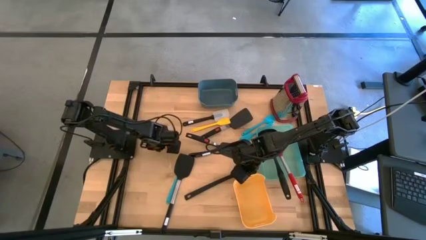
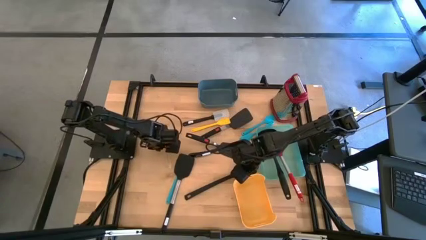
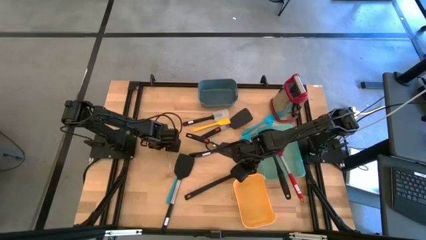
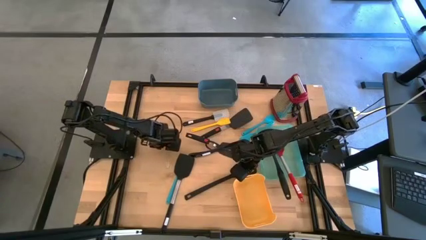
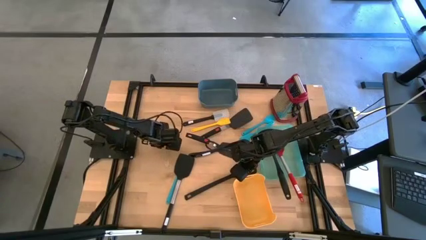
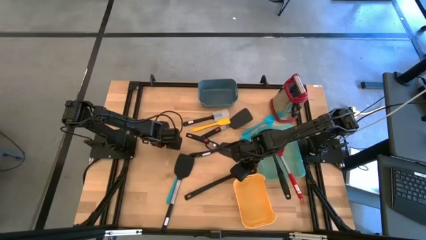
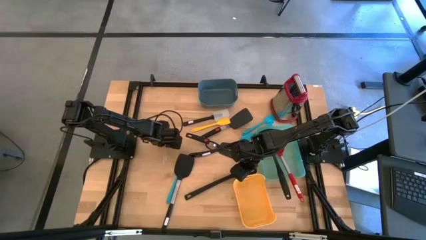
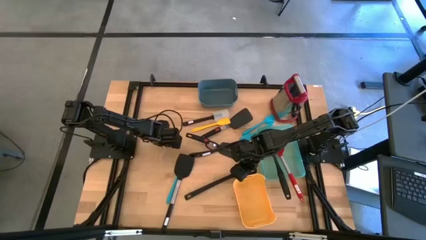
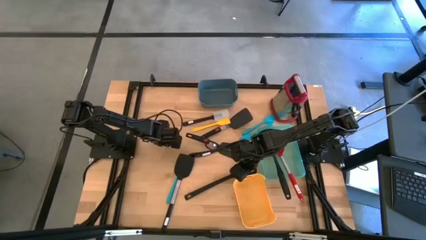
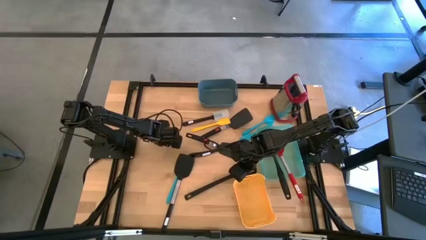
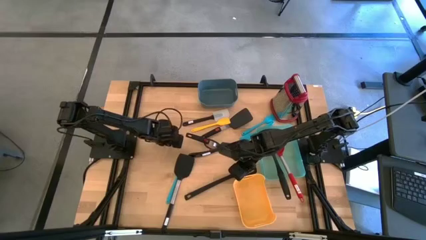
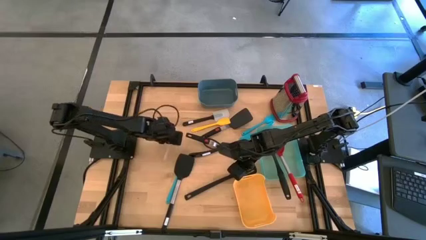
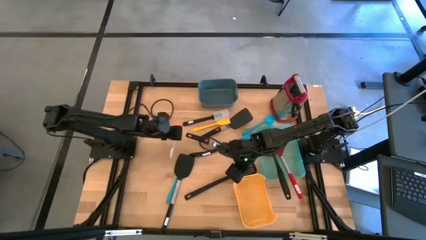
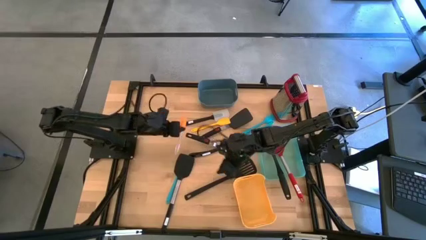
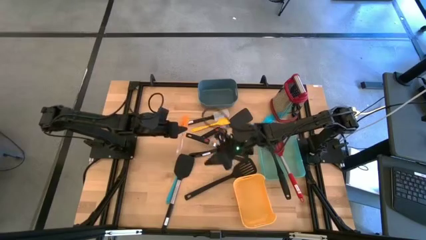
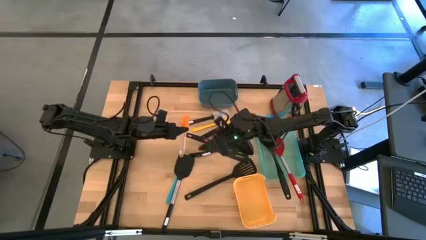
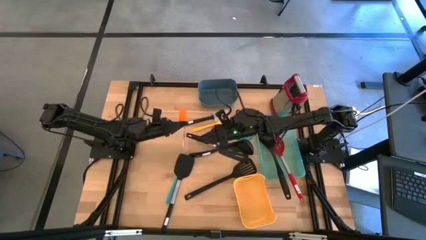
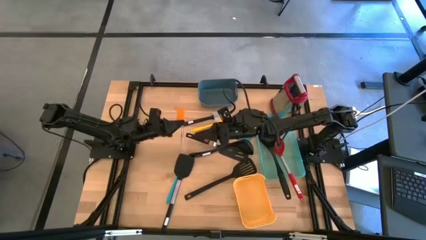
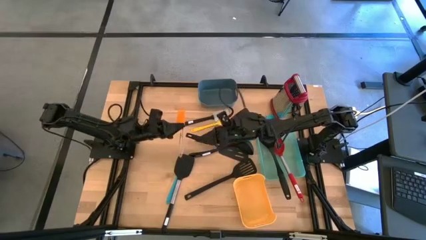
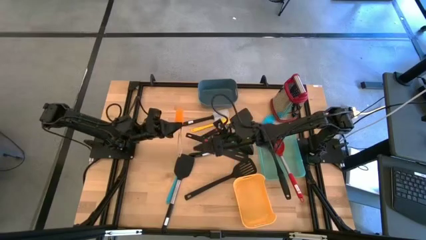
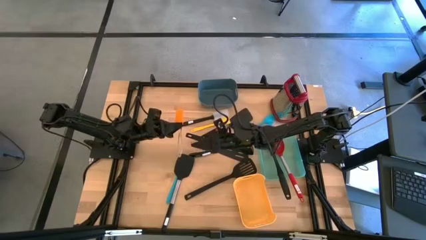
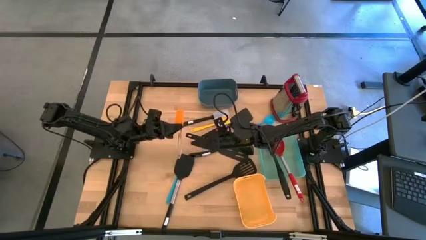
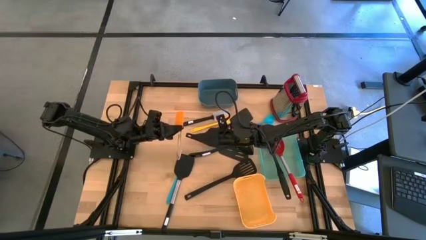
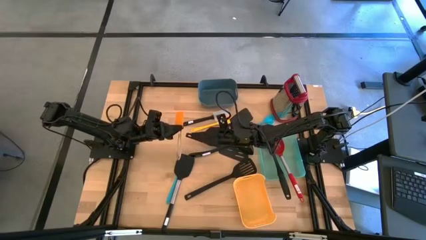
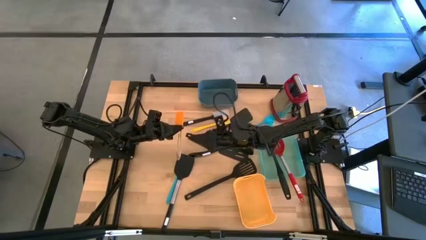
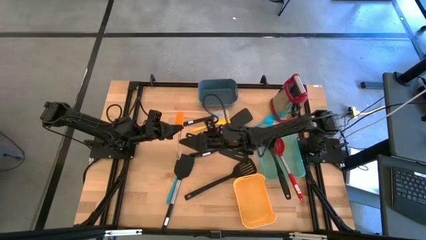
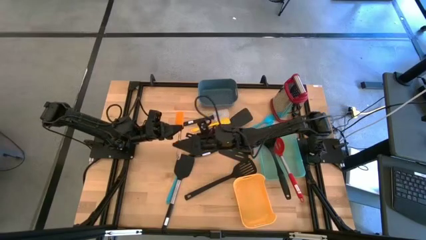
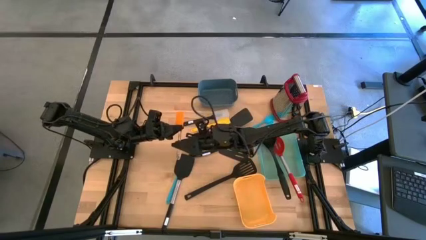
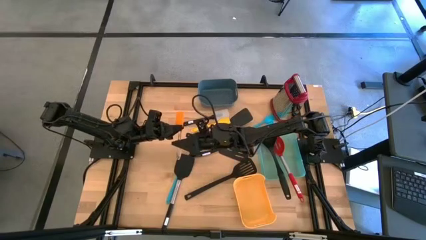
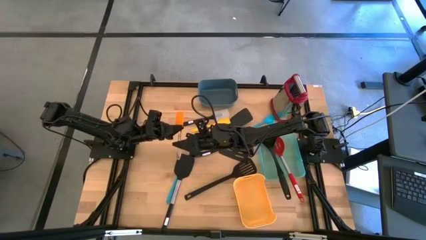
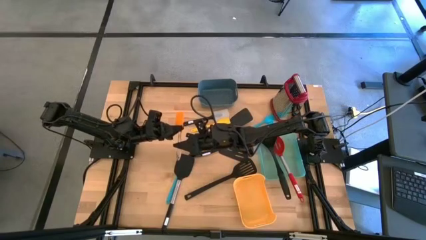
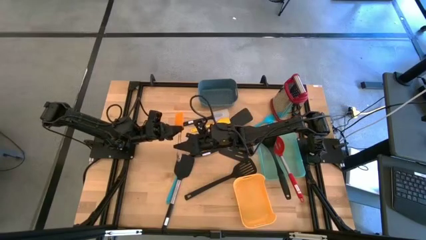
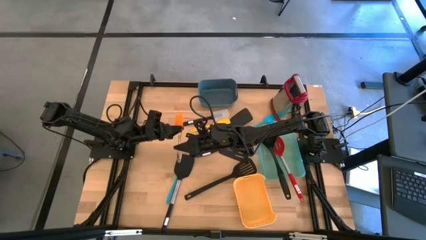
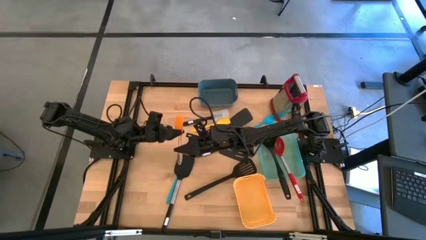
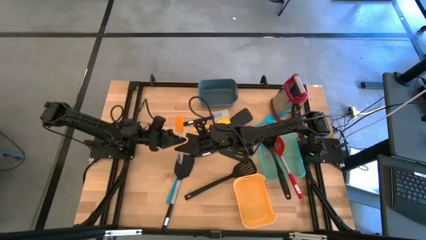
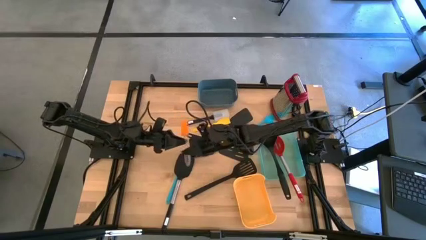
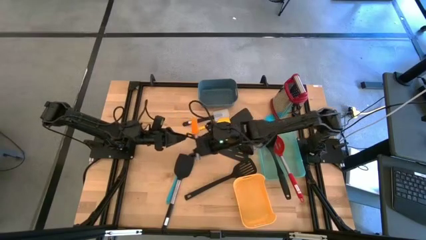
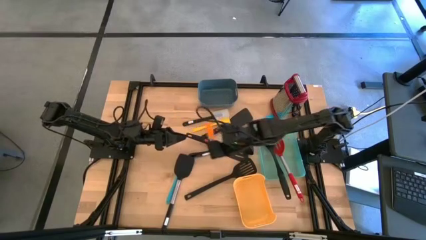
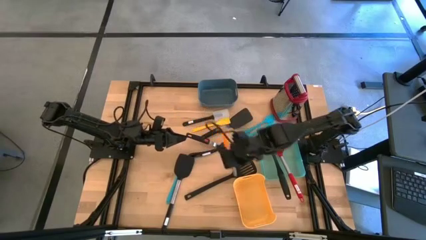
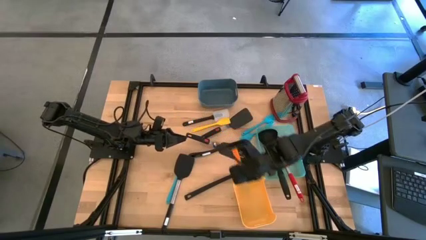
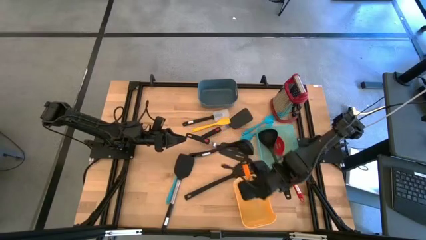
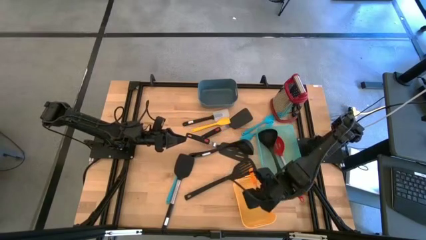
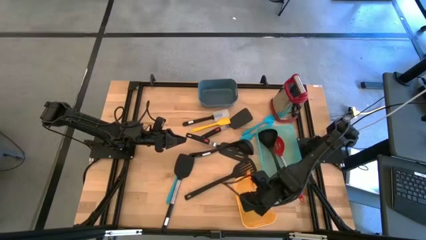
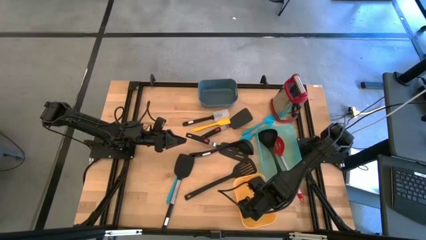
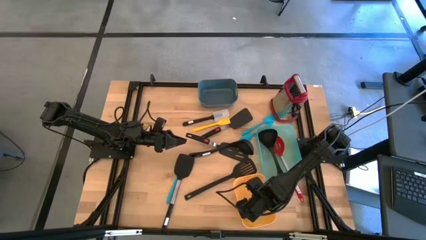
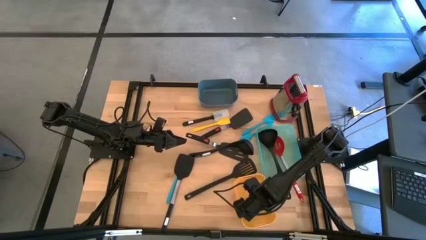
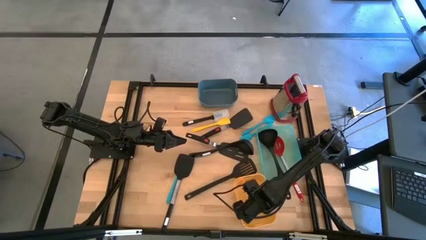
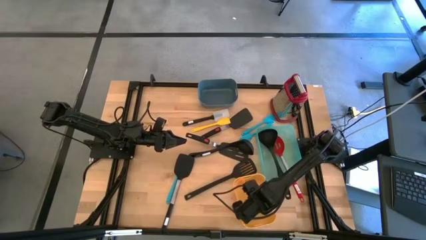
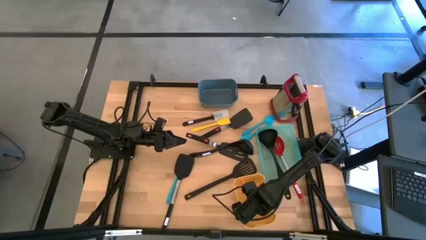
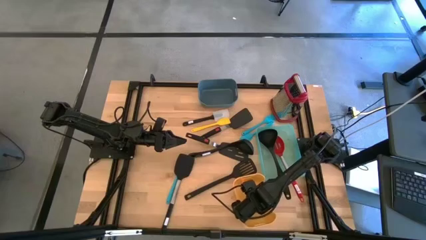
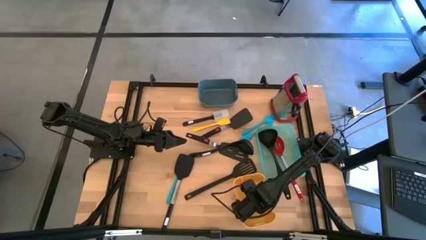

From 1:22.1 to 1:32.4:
Task: Pick & Place Kitchen Items
Put the small orange spatula into the yellow bin

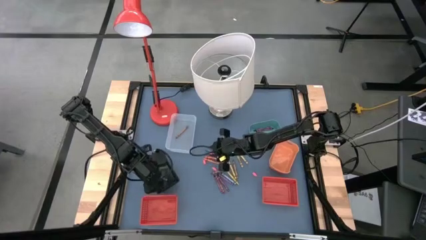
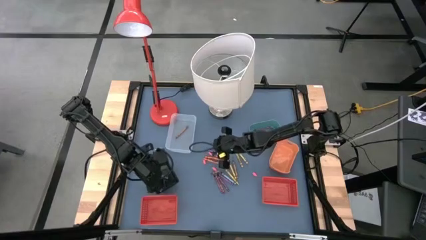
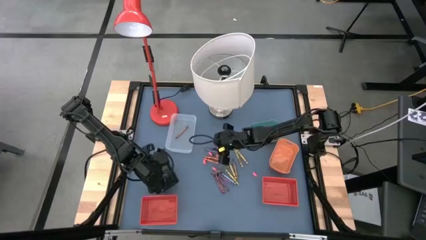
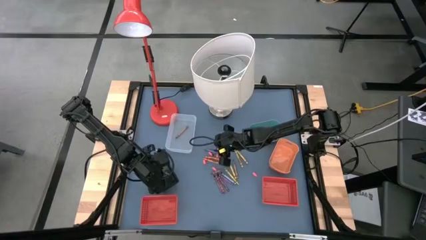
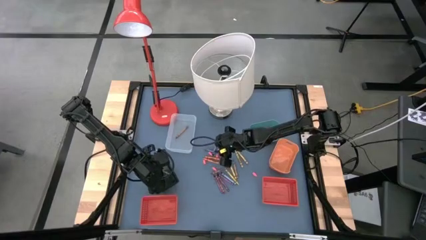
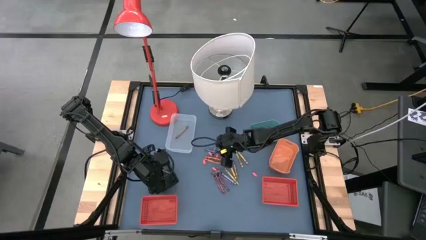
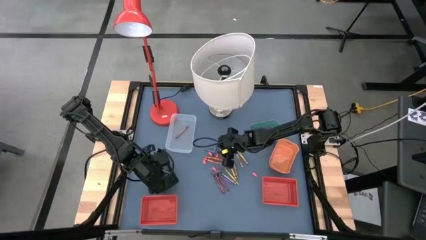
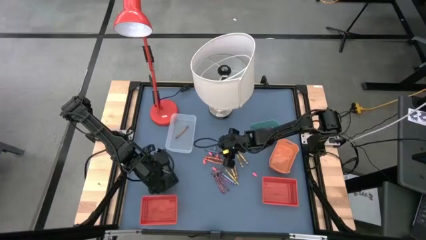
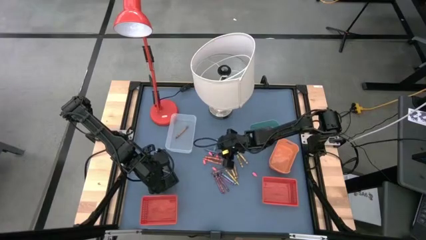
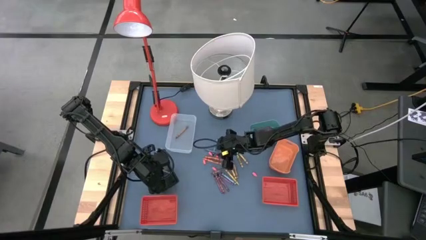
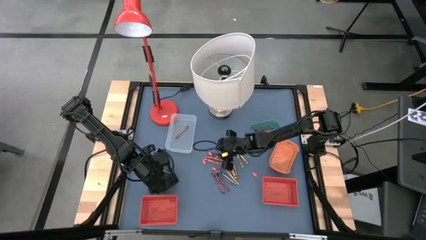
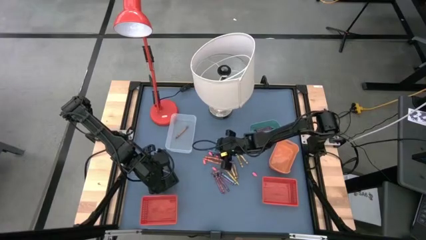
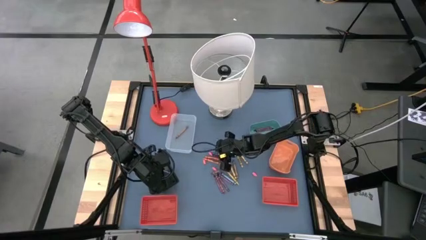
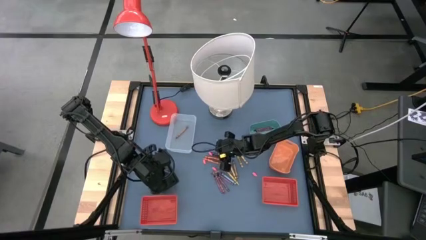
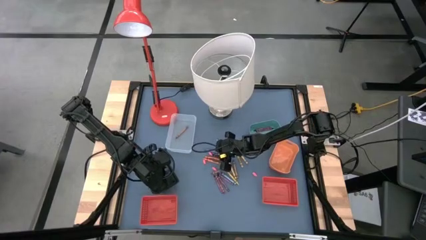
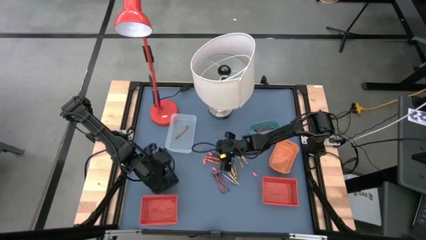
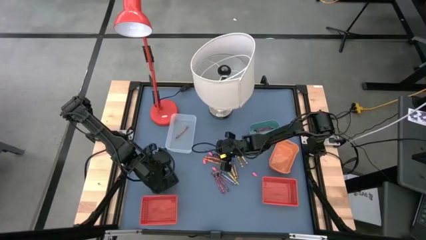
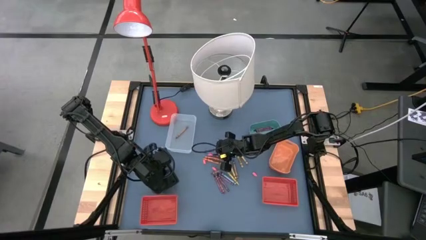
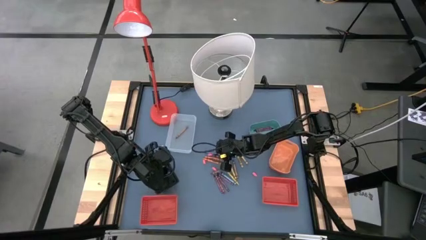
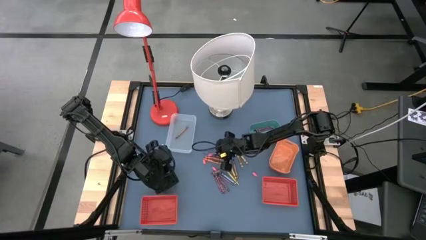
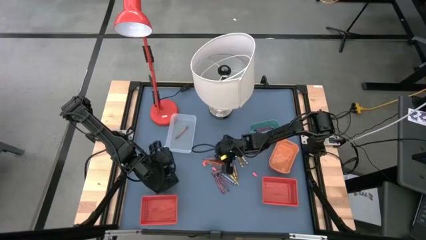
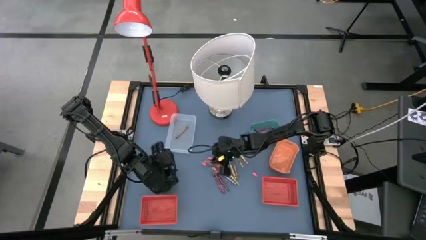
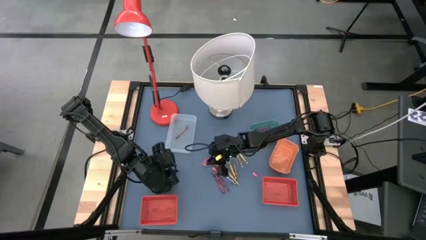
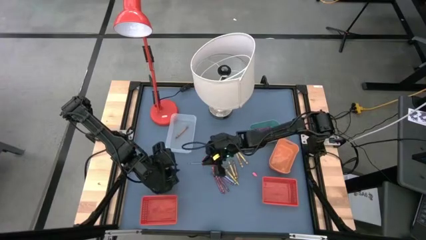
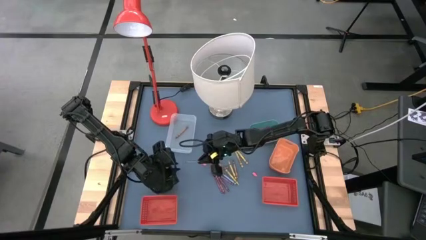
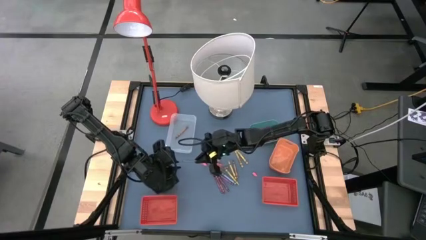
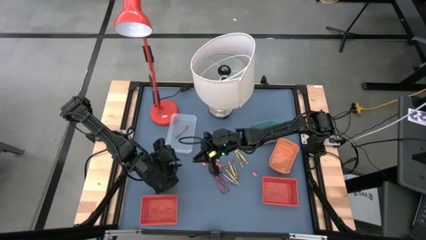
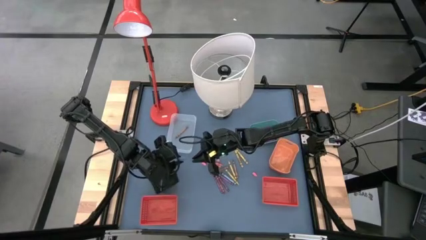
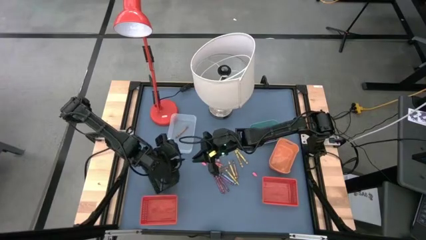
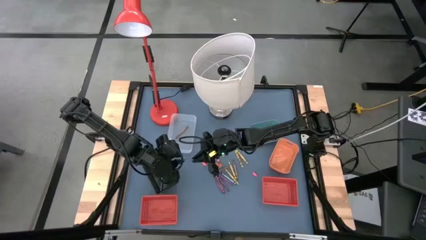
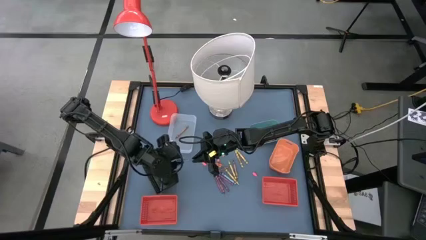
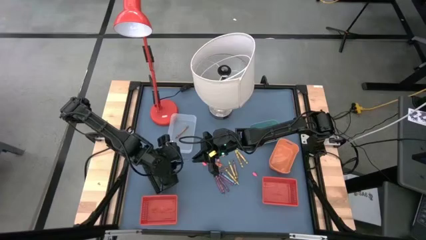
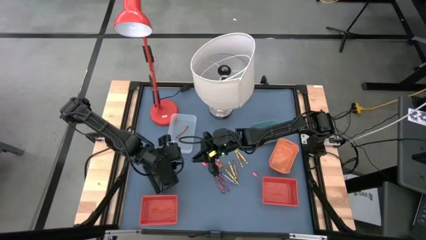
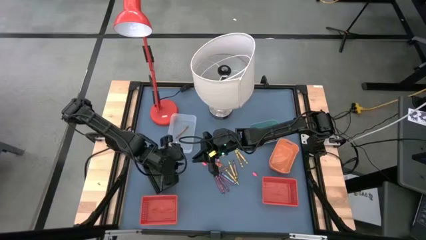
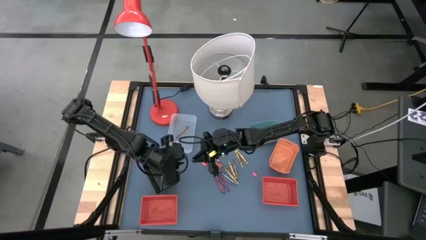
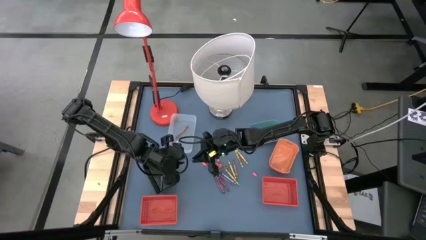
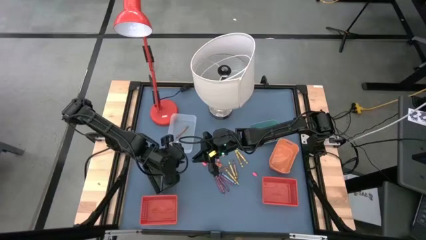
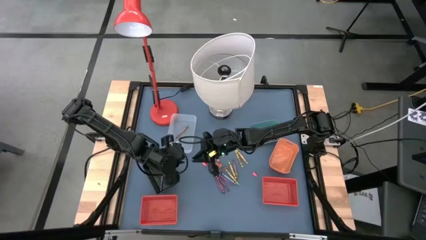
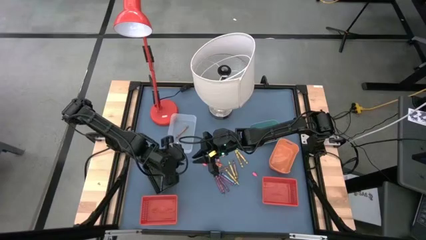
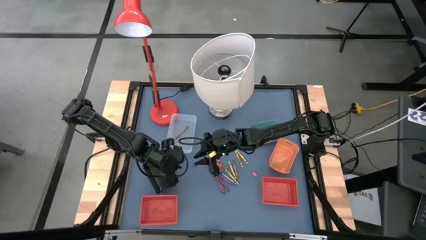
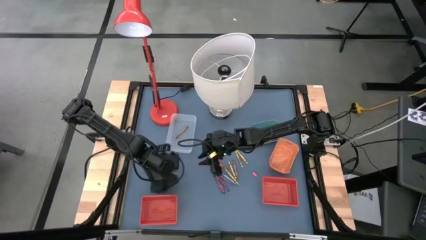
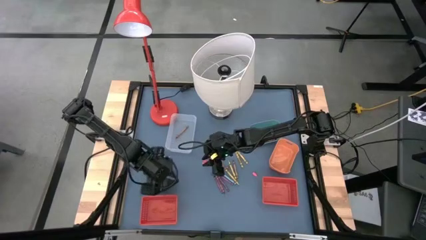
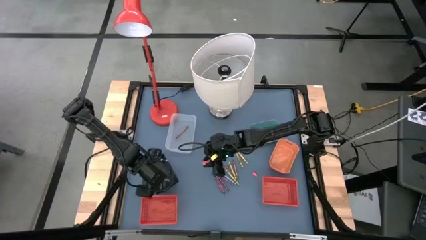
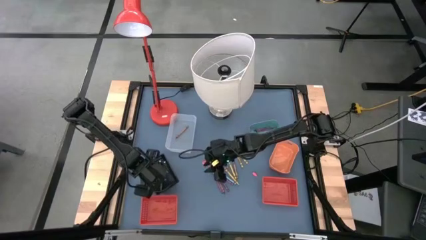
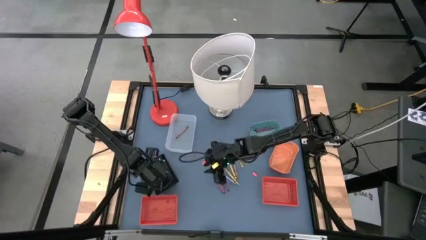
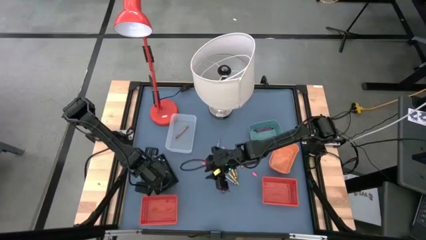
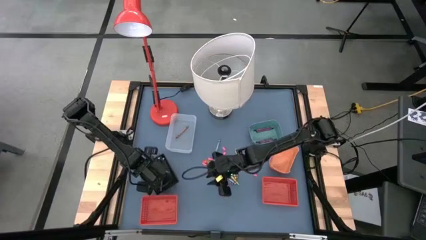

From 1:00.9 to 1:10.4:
Task: Sort crayons
Put the dark blue crayon into the black bin
